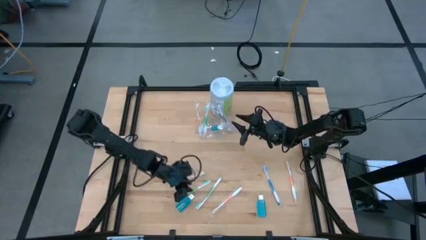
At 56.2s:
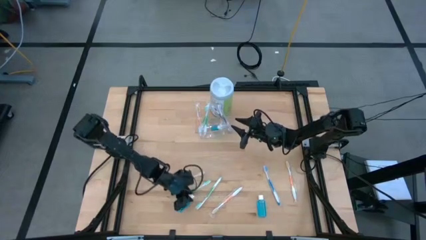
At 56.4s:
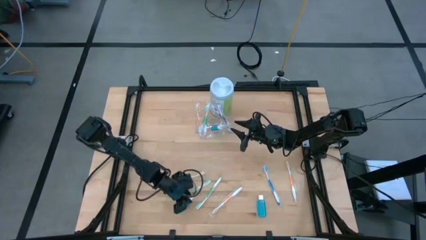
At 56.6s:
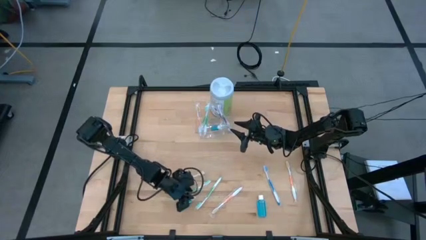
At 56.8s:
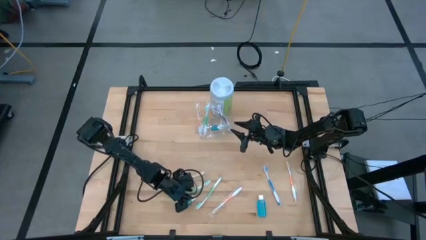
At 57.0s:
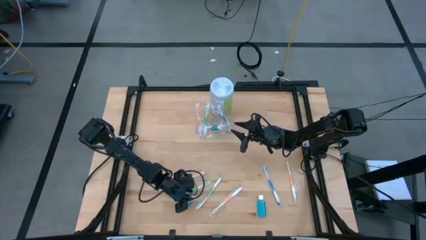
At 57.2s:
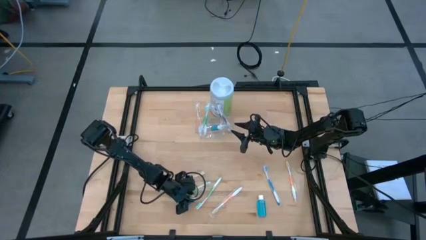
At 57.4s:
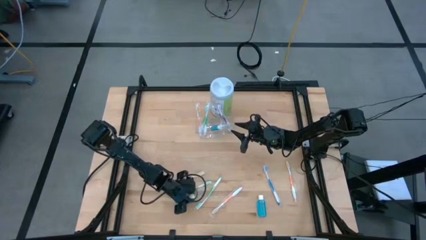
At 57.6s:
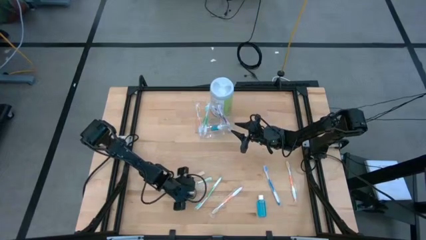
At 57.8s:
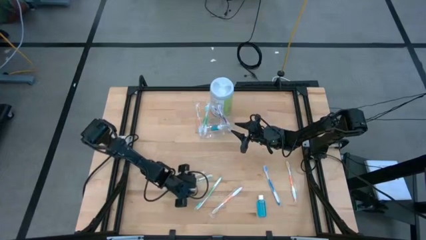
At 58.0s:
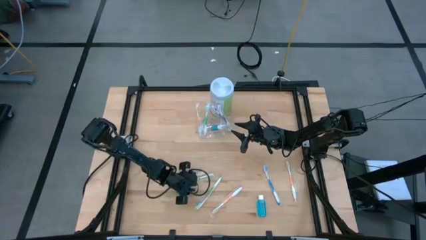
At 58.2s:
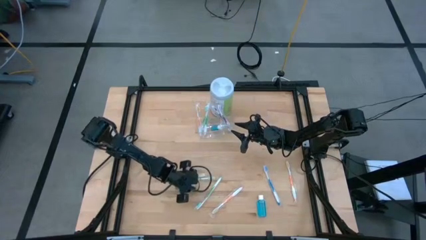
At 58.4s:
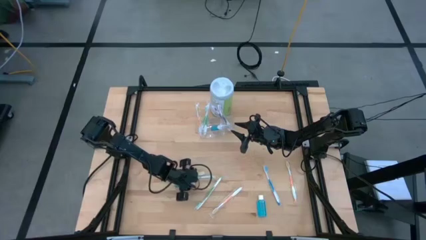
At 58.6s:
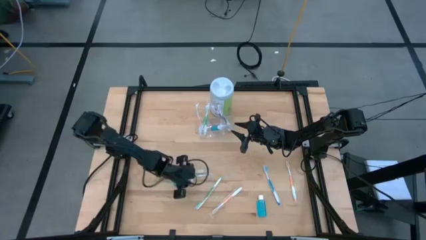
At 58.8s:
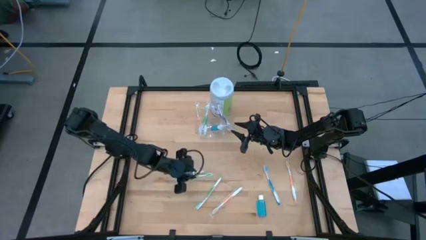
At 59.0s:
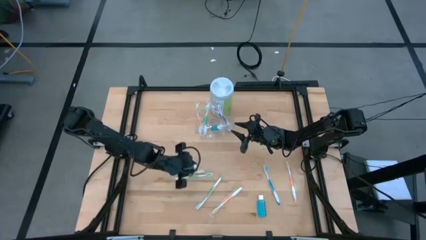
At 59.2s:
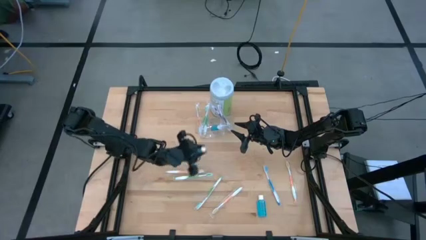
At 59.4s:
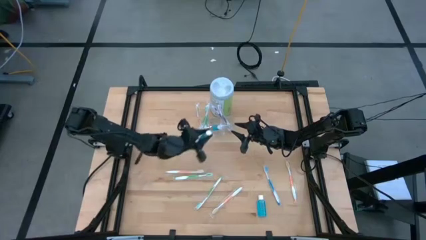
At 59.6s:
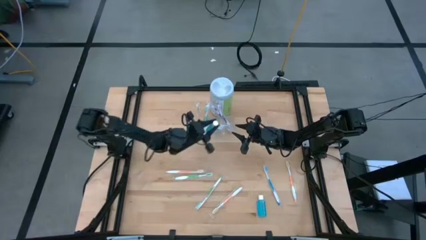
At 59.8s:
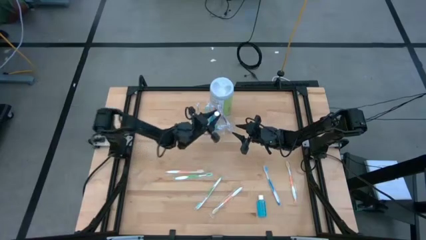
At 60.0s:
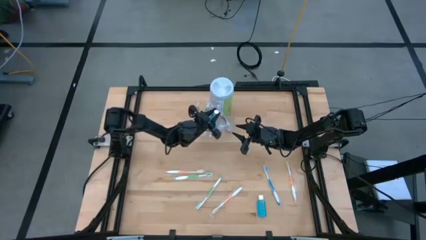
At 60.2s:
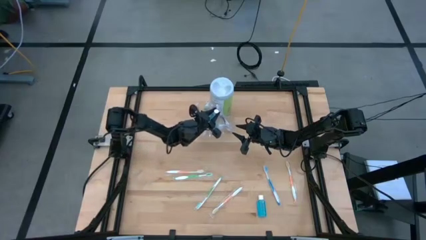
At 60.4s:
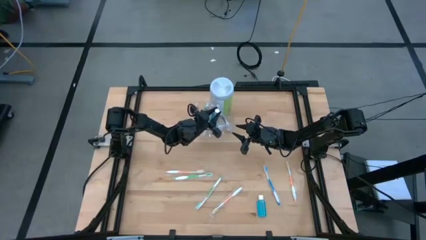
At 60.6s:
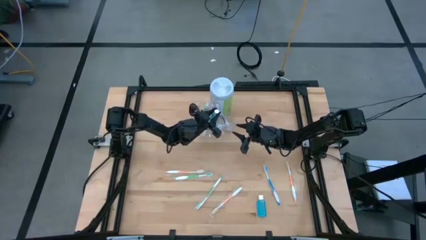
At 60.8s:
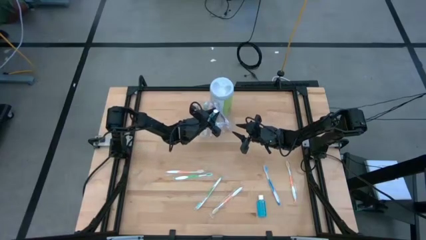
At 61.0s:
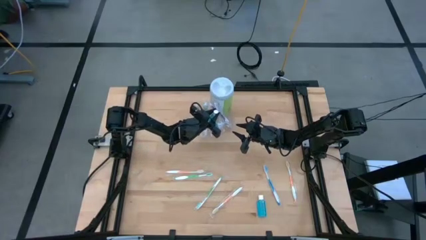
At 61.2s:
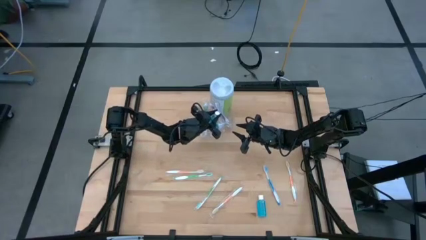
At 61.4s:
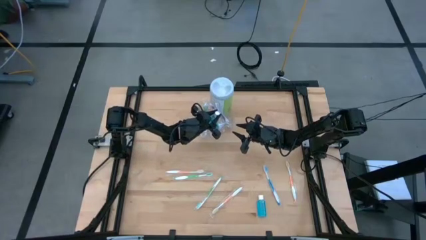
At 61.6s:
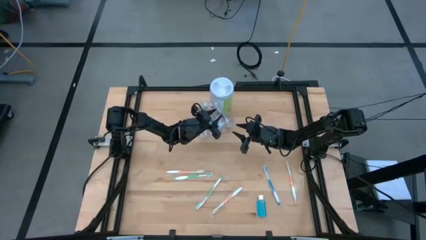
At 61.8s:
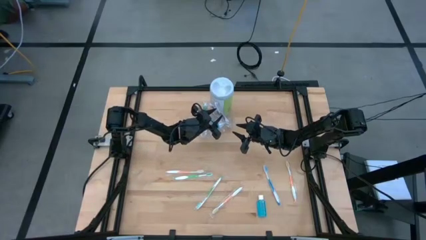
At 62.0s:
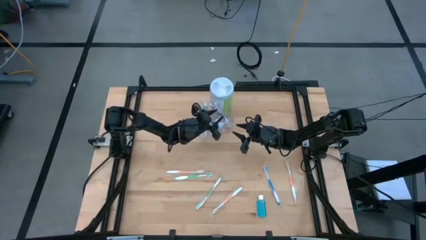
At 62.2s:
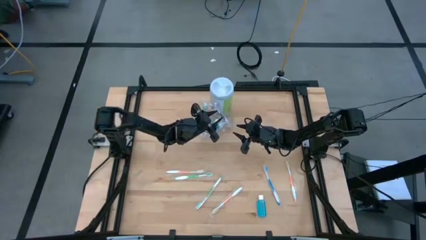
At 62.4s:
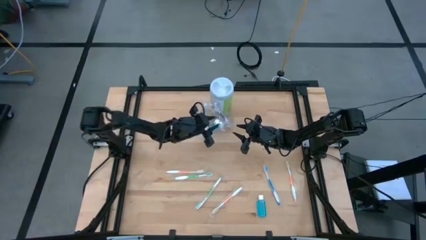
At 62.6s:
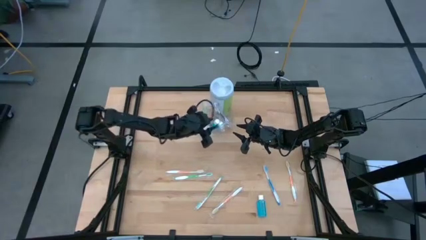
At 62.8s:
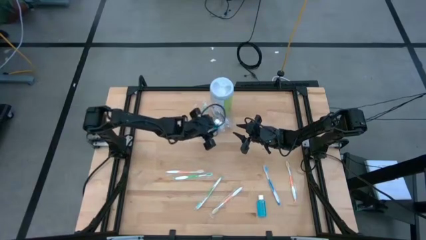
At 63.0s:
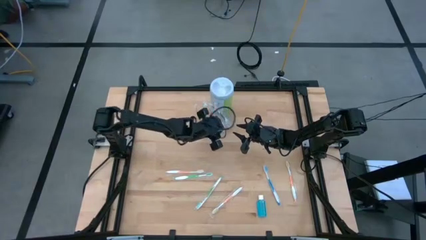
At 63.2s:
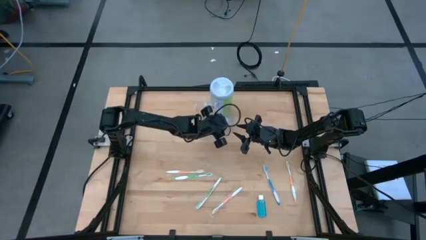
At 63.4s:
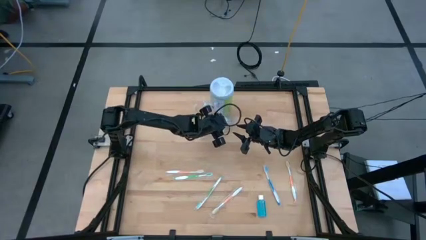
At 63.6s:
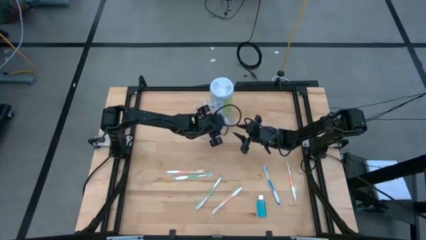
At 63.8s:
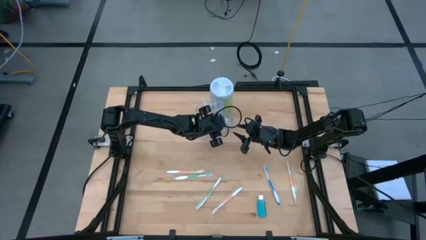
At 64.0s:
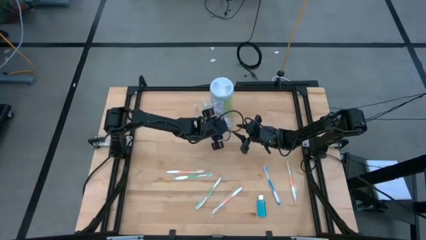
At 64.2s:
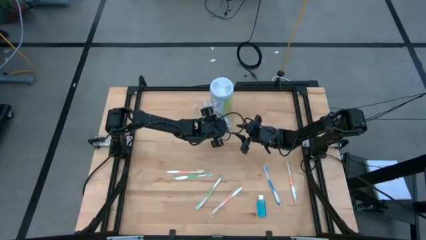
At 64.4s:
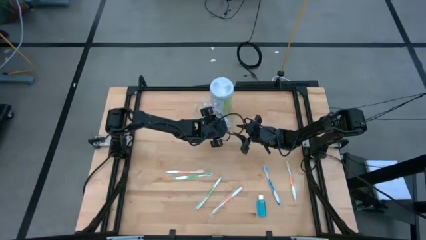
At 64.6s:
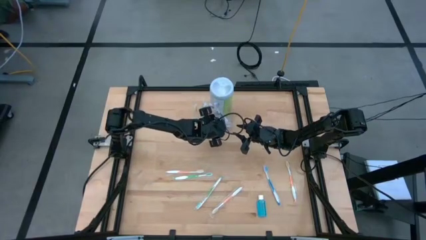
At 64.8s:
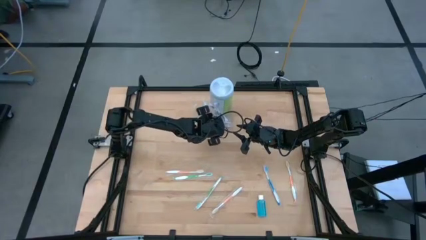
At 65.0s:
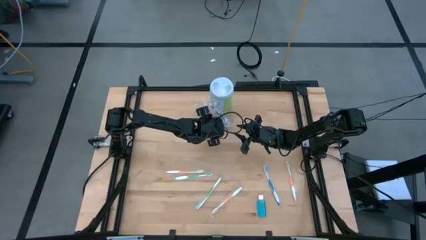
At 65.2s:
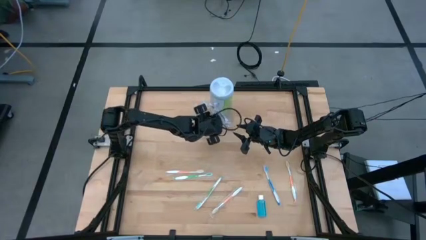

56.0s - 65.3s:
Task: Pick & Place toothbrushing station
Put the left mouthwash bottle into the transparent organizer

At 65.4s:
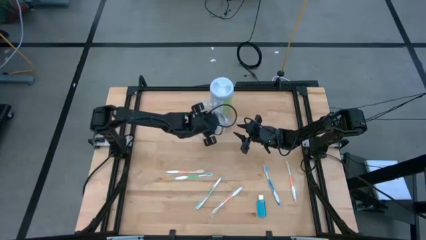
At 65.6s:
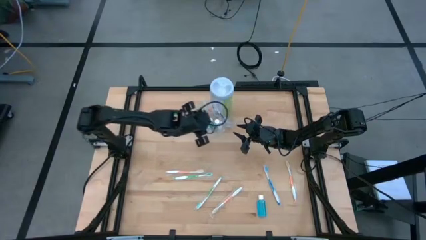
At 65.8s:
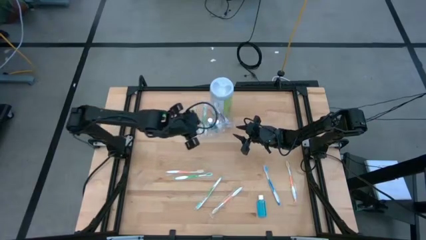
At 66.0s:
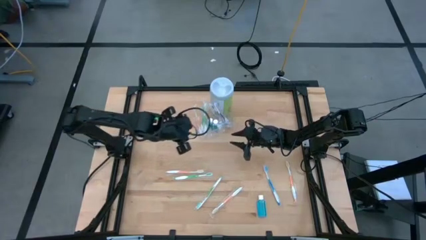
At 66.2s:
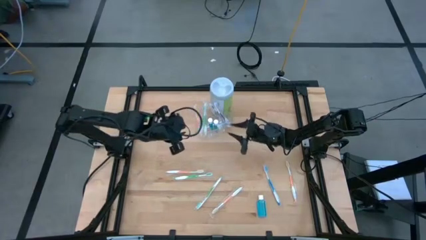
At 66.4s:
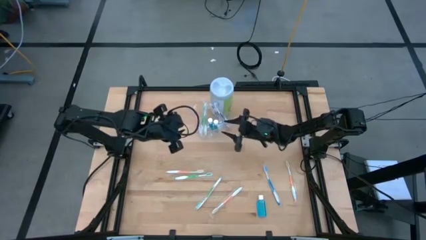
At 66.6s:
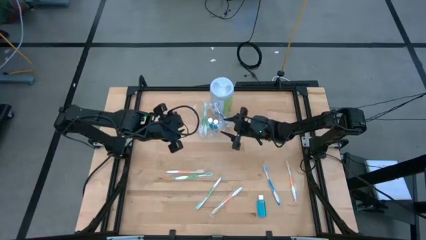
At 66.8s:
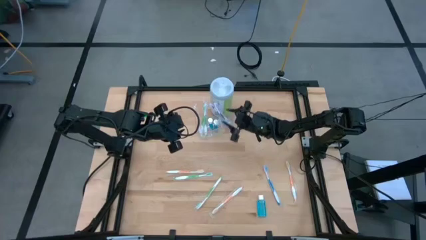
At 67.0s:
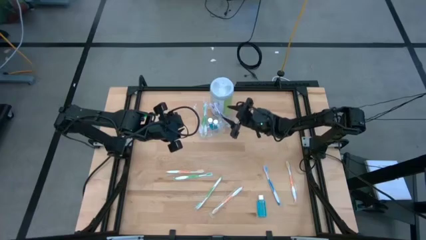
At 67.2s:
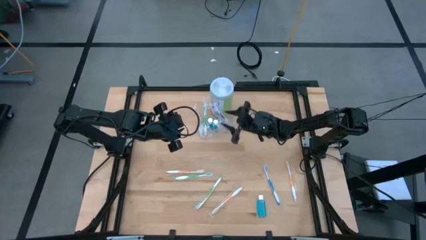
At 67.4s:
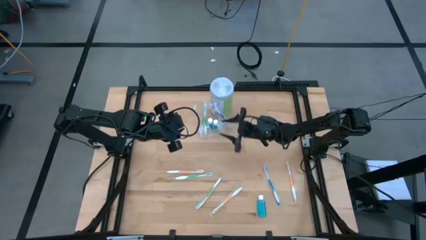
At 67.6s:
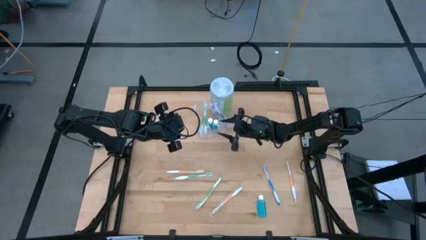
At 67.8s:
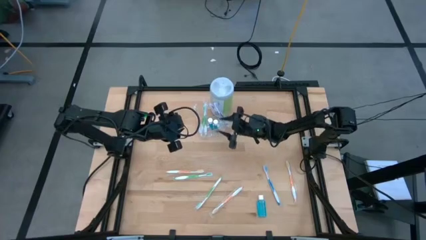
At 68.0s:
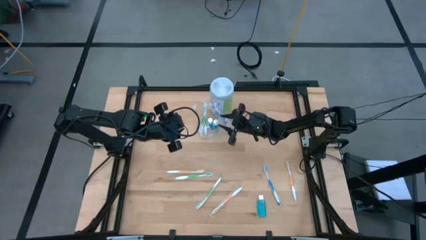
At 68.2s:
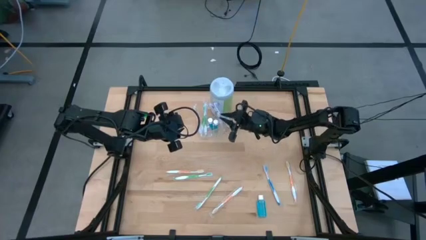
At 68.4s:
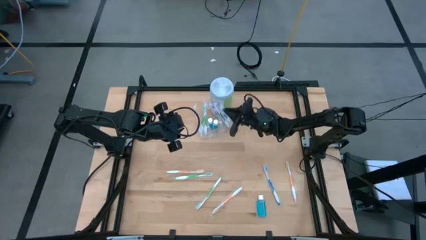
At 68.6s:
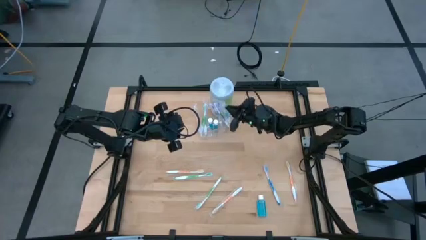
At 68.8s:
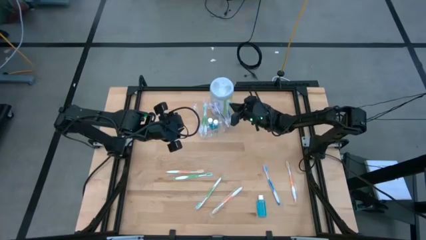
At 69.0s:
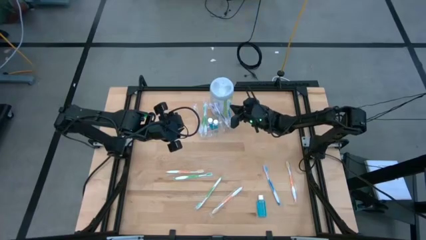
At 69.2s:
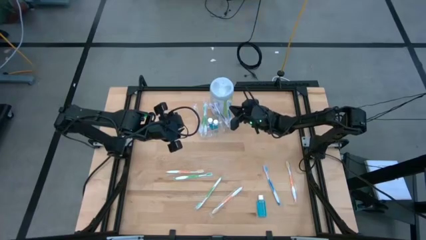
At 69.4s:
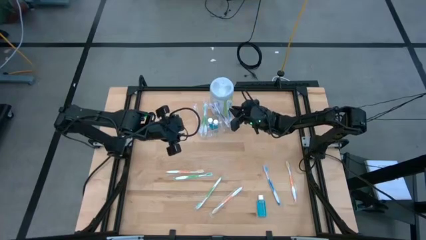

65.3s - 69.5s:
Adjust the blue toothbrush in the transparent organizer

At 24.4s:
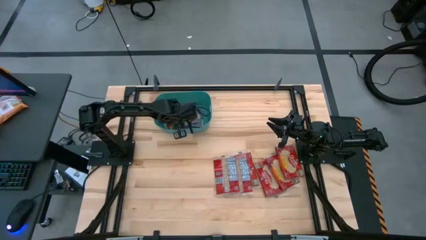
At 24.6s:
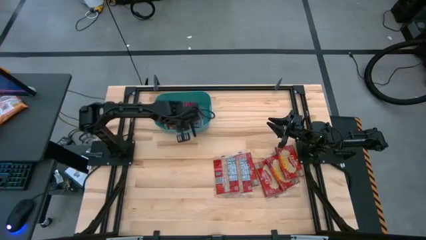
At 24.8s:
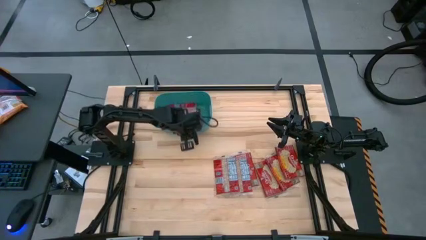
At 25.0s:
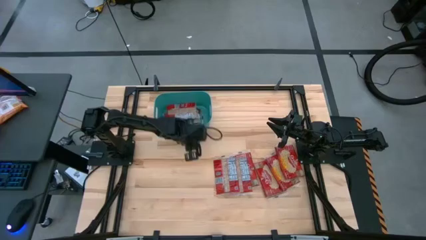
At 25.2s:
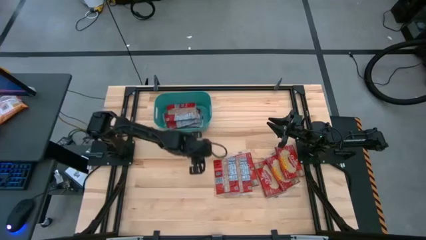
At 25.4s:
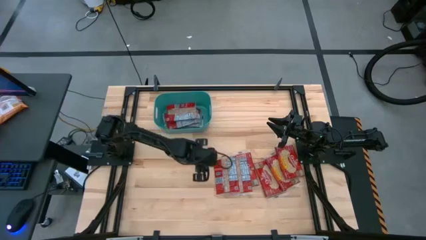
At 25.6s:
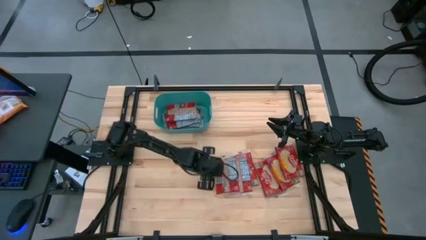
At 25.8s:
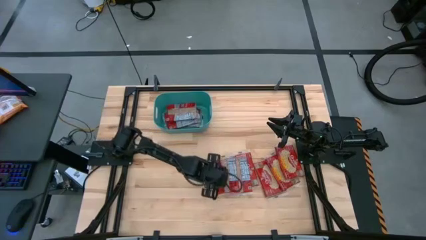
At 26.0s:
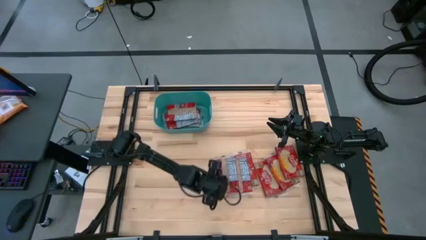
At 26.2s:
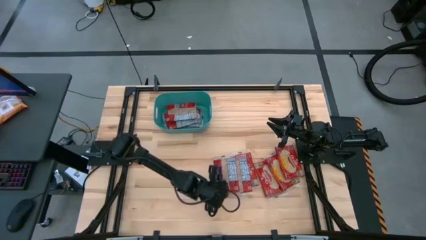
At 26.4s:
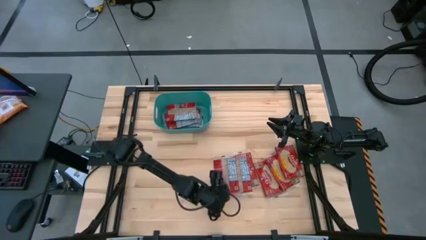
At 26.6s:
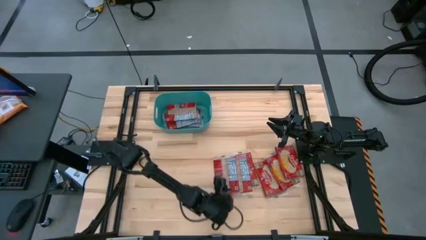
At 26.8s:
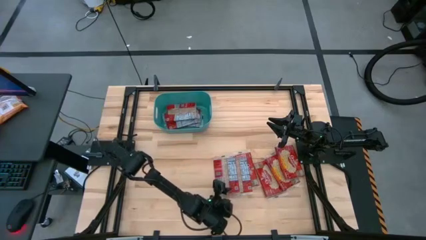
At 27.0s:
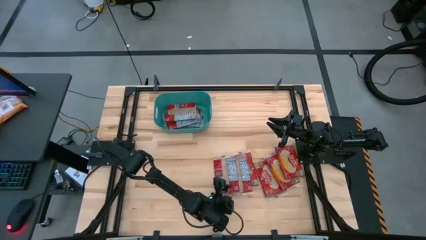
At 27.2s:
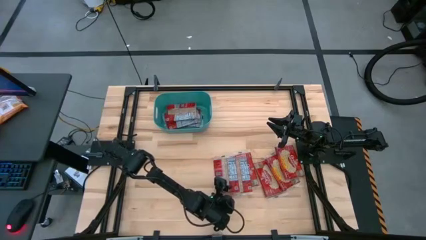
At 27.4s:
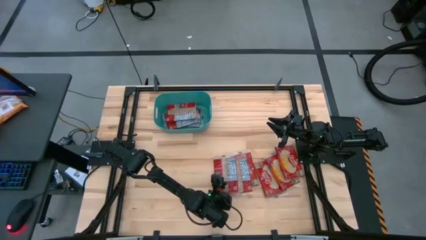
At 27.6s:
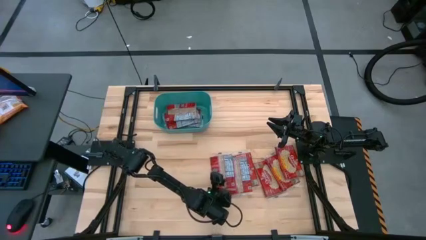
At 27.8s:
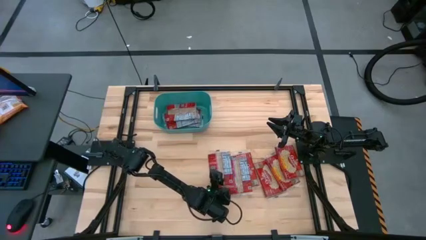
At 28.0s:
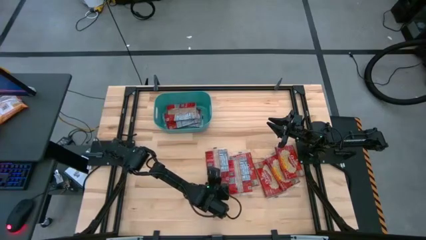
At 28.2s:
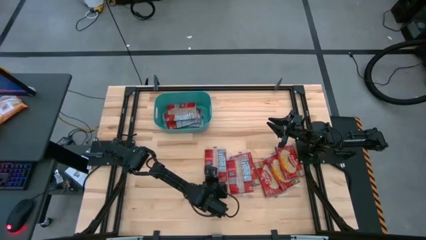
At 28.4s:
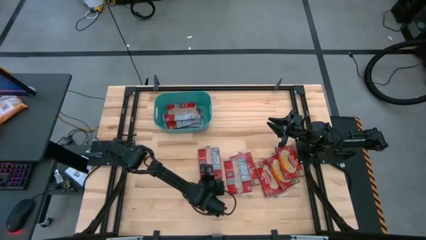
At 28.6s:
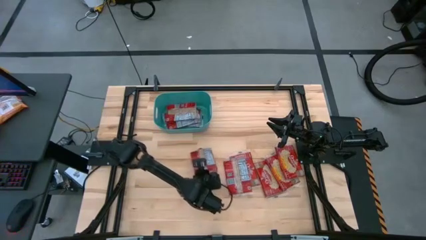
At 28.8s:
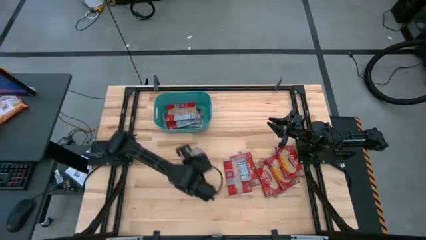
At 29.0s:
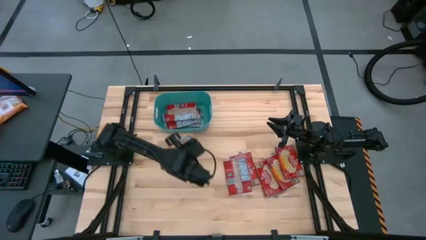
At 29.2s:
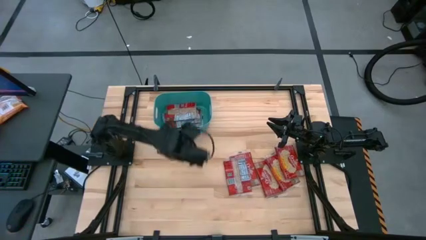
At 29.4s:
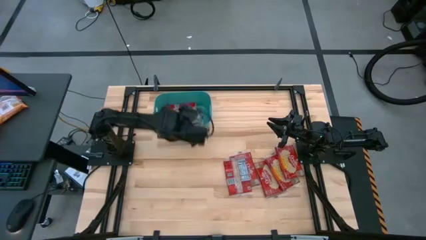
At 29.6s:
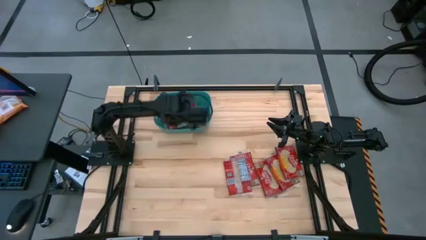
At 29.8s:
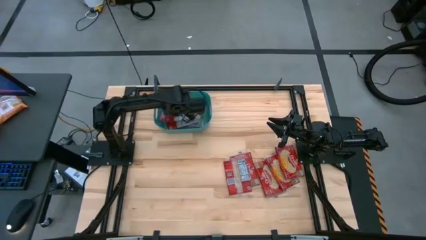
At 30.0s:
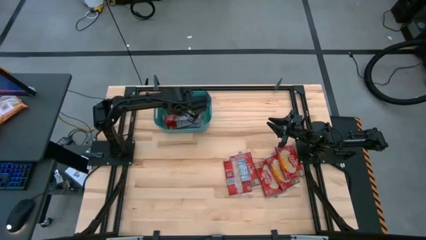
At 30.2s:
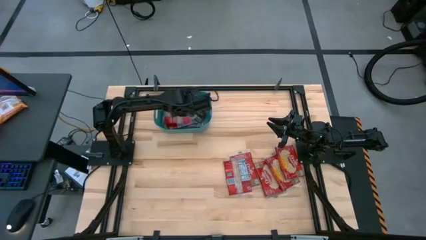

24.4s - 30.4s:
Task: Sort popcorn bags into baskets
Put the popcorn bag into the green bin
